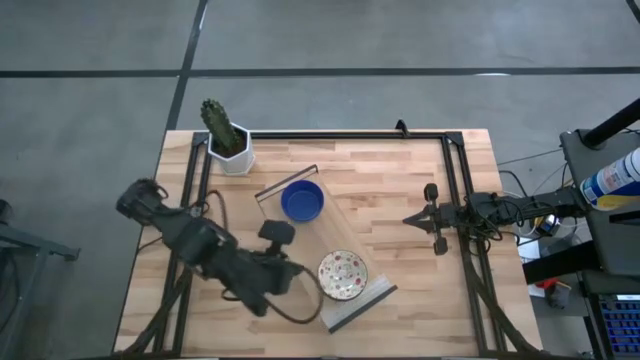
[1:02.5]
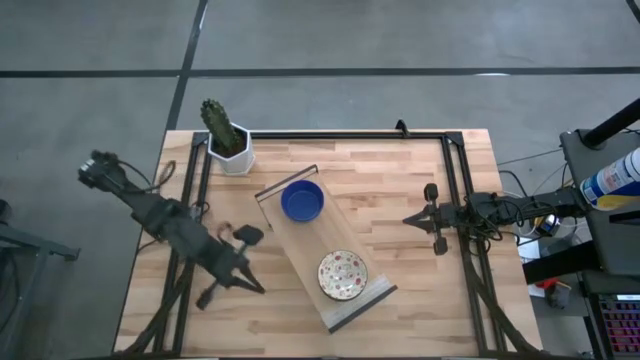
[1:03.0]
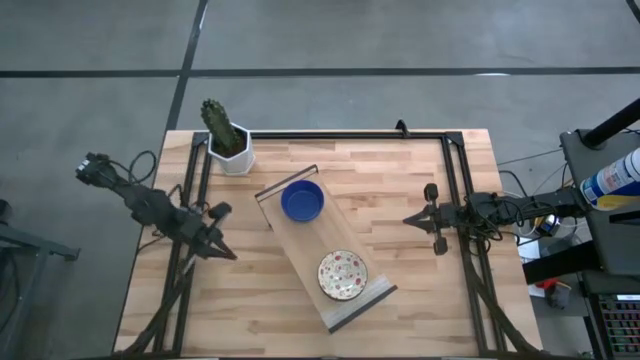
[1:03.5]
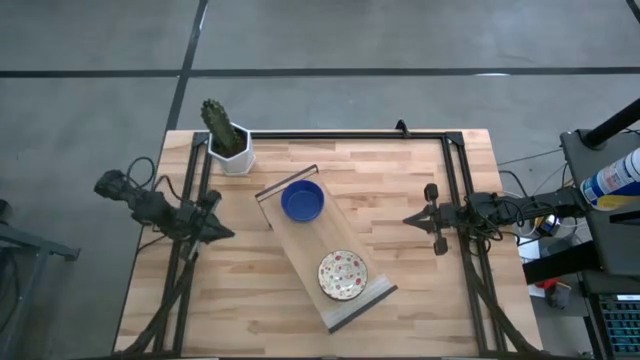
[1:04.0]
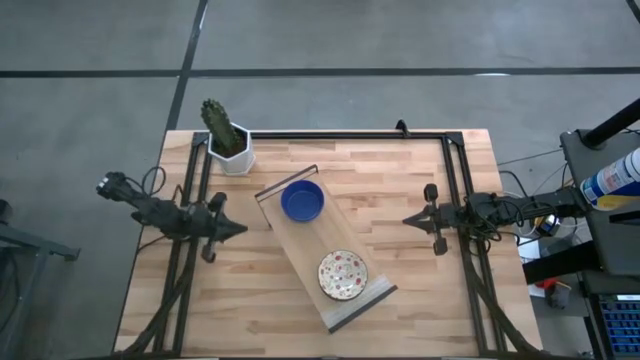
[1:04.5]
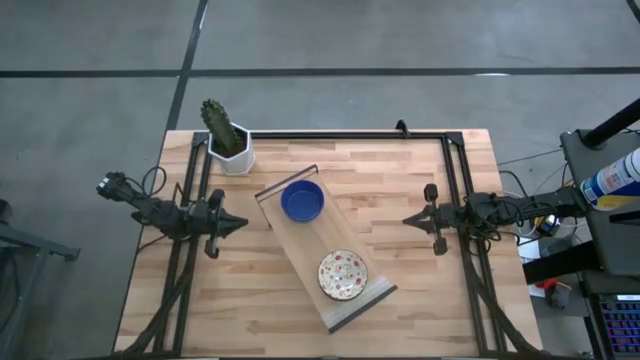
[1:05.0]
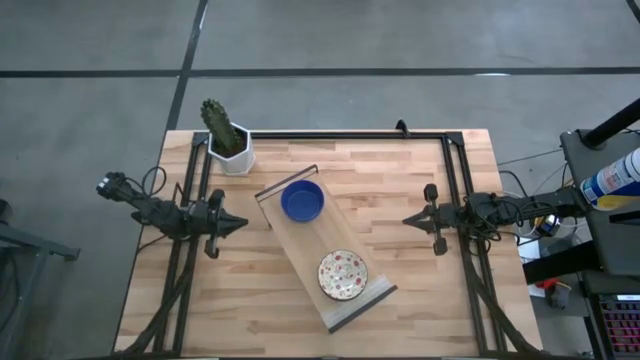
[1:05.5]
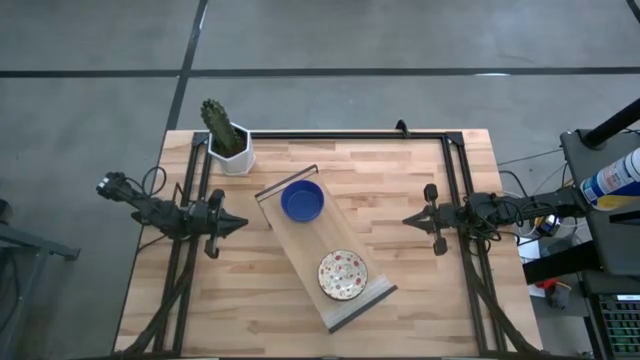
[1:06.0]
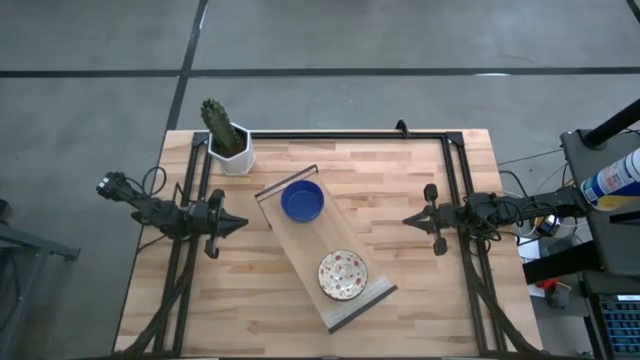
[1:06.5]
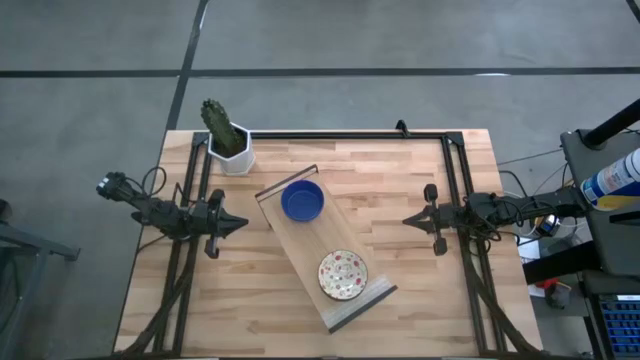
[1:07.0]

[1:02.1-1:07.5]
Task: Pick & Place Mini bowls
Return to Home Position

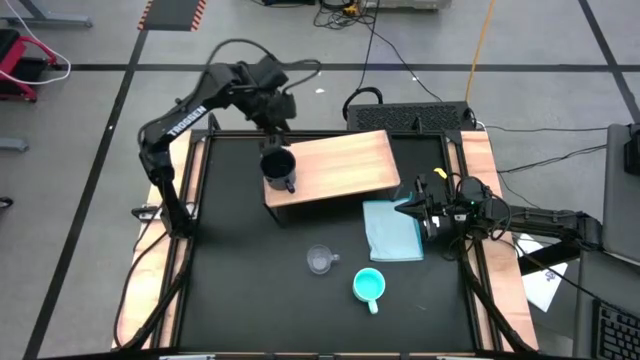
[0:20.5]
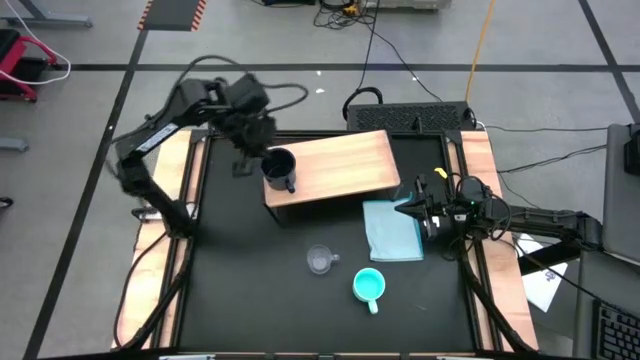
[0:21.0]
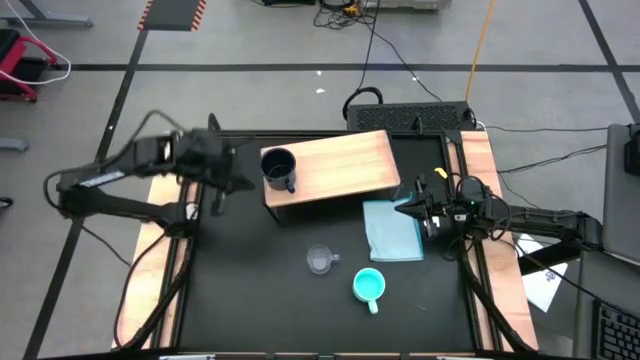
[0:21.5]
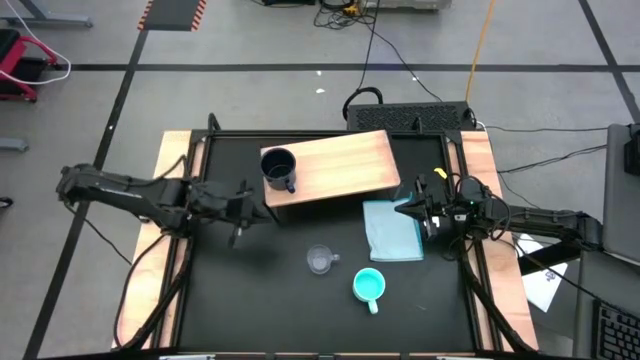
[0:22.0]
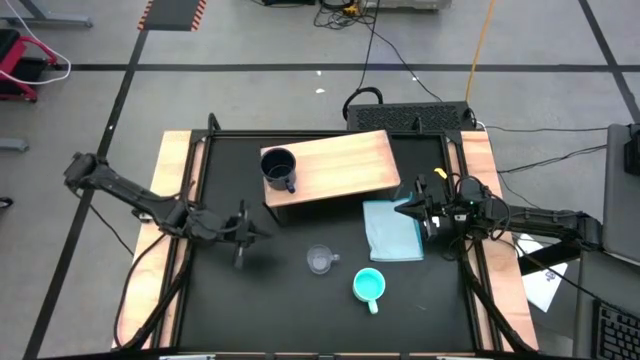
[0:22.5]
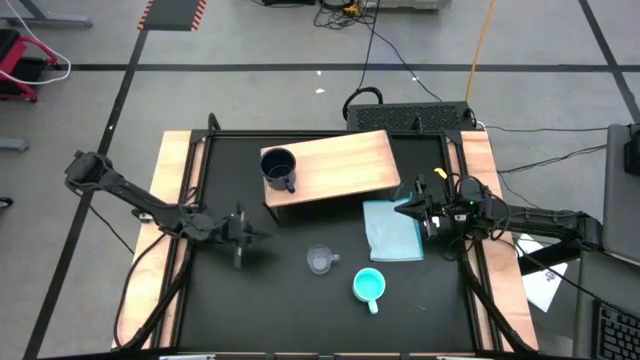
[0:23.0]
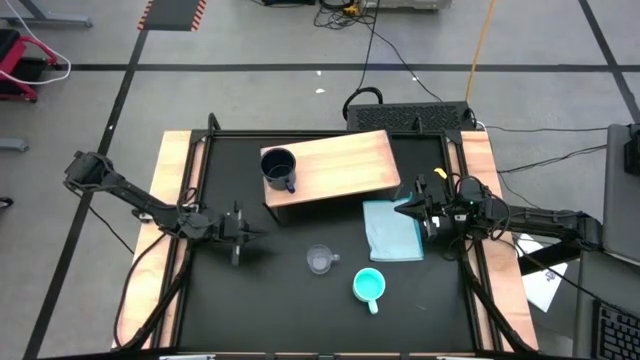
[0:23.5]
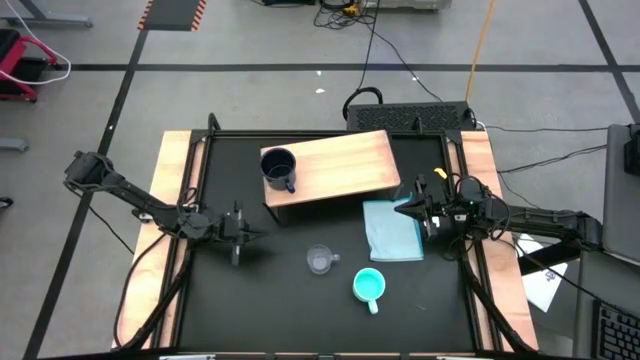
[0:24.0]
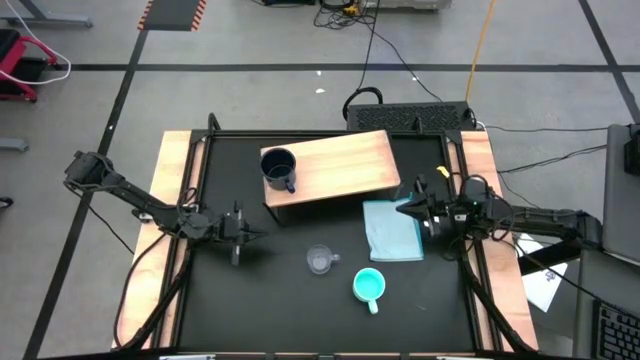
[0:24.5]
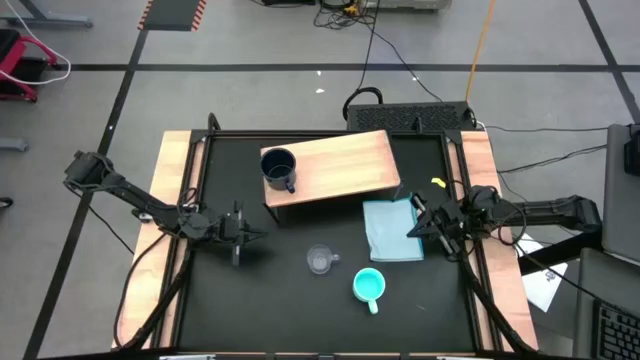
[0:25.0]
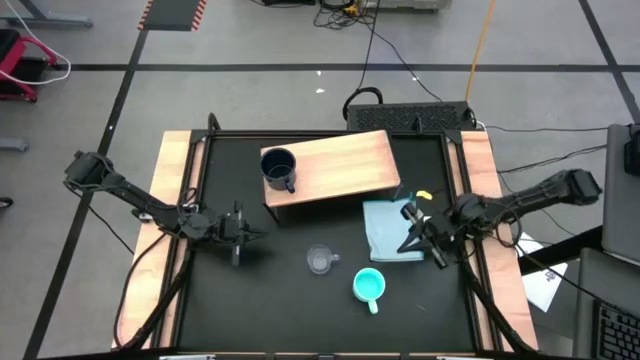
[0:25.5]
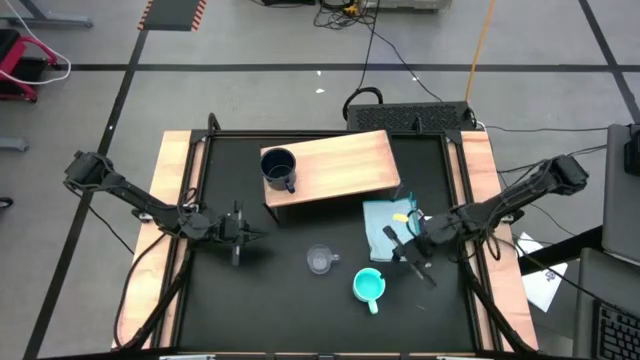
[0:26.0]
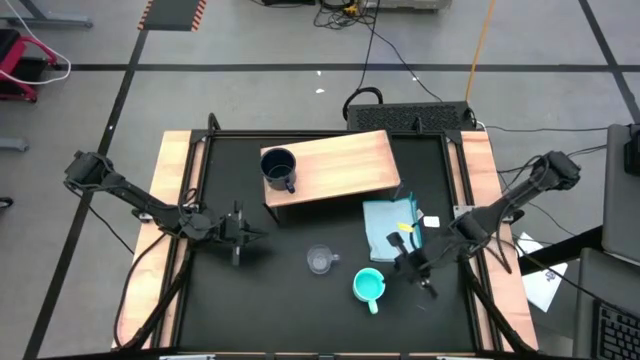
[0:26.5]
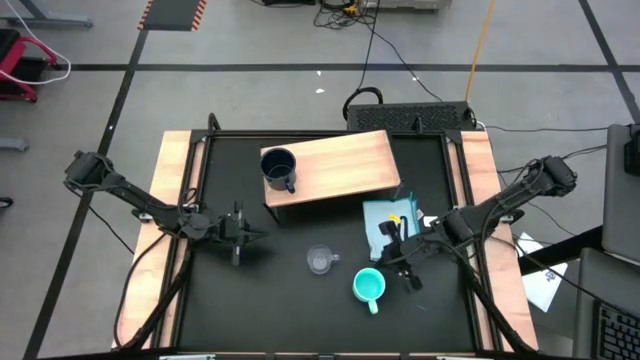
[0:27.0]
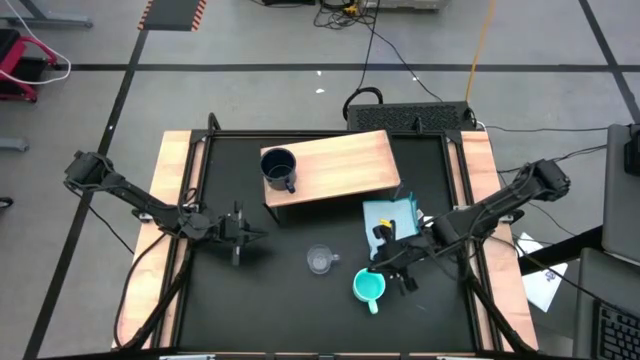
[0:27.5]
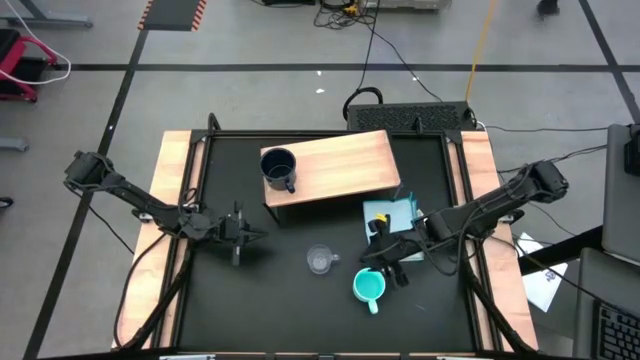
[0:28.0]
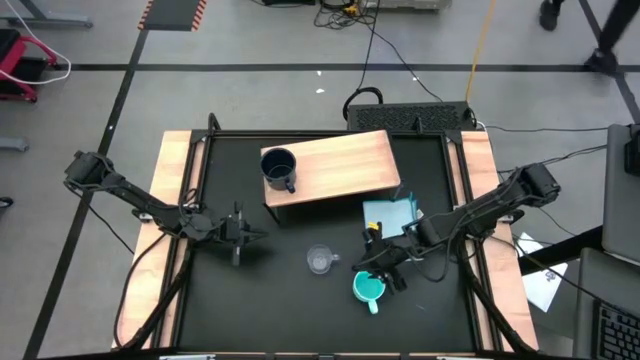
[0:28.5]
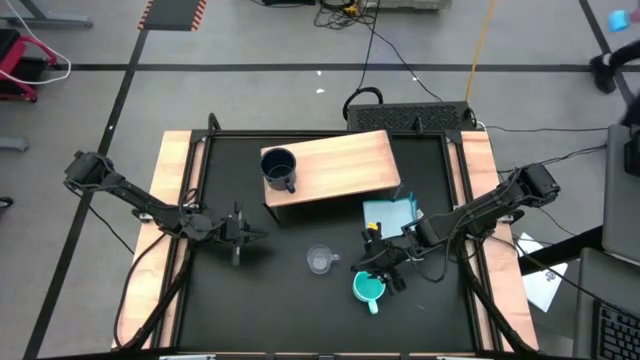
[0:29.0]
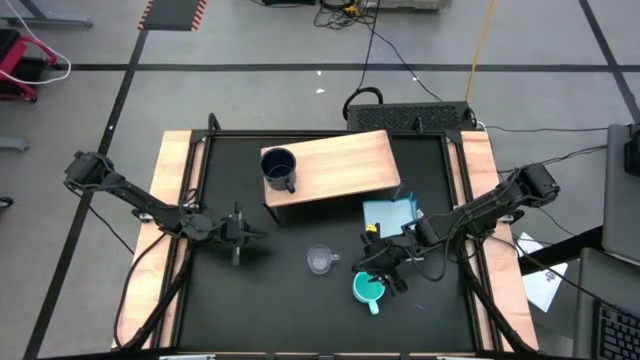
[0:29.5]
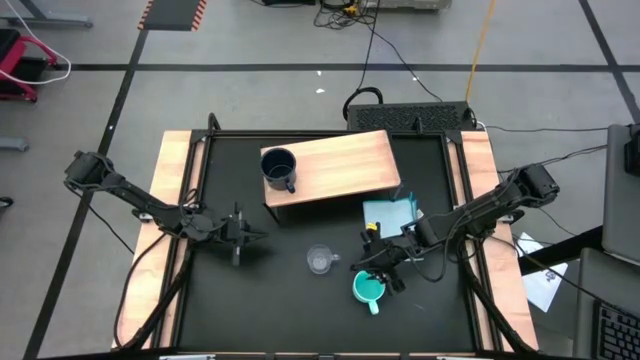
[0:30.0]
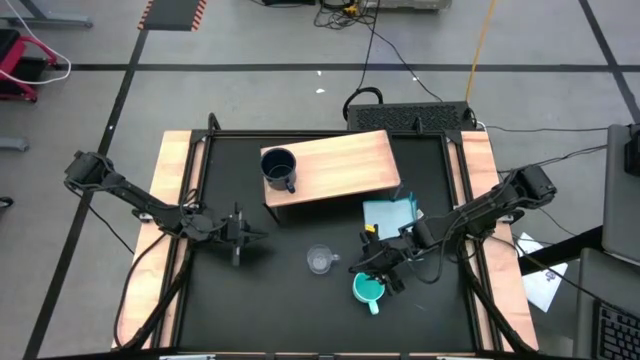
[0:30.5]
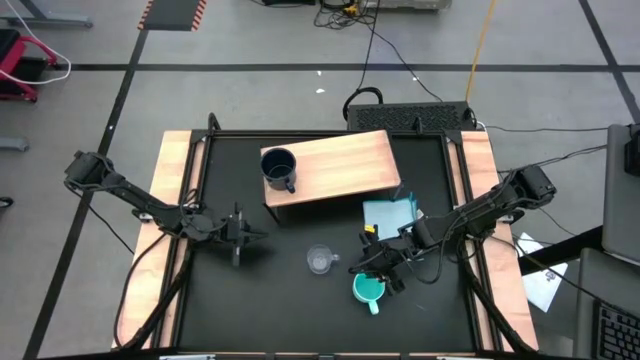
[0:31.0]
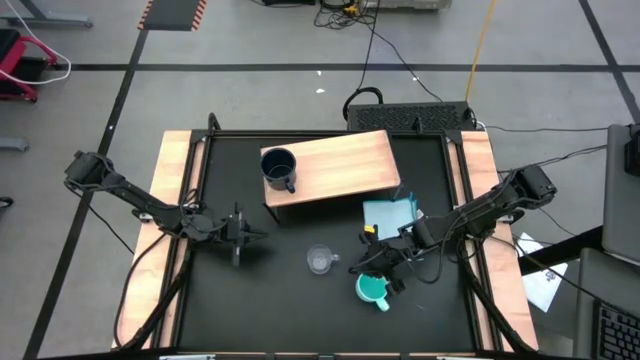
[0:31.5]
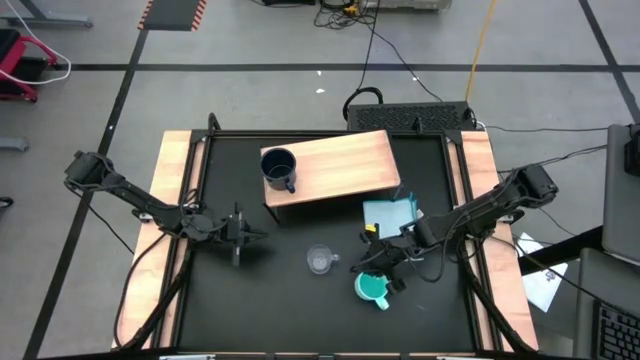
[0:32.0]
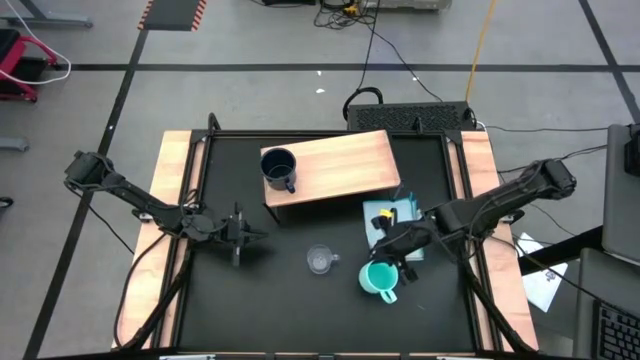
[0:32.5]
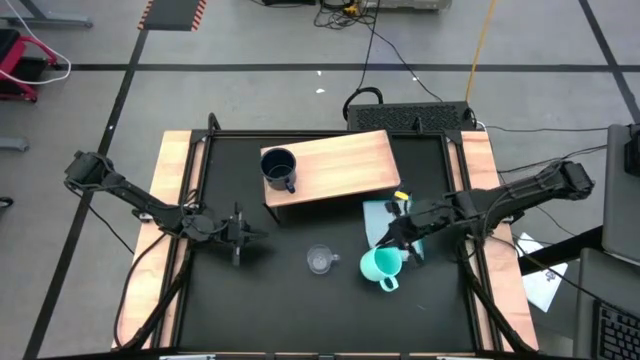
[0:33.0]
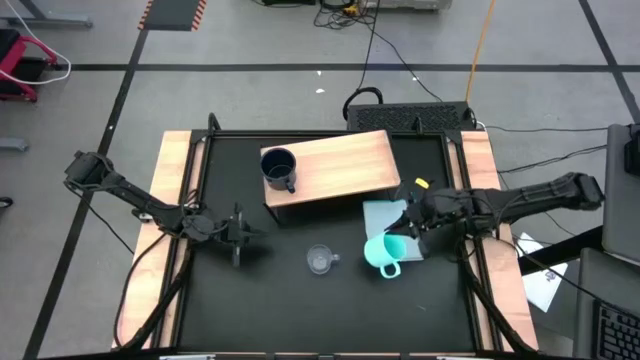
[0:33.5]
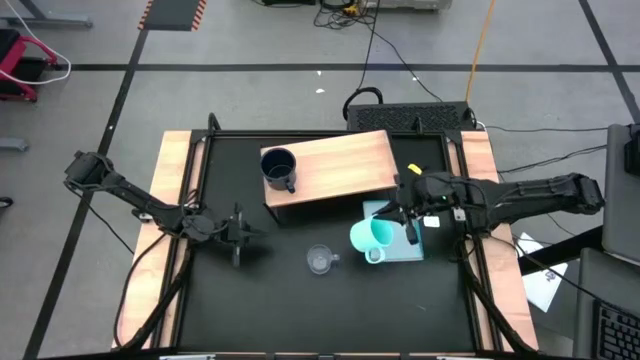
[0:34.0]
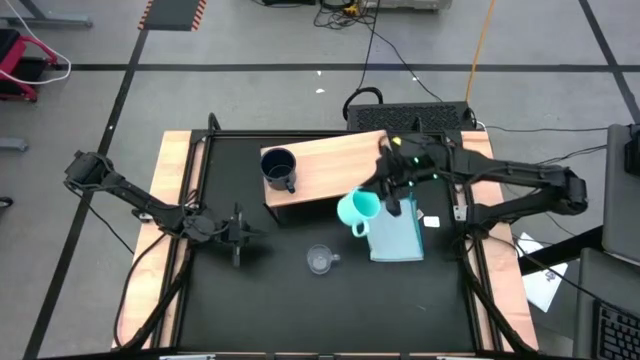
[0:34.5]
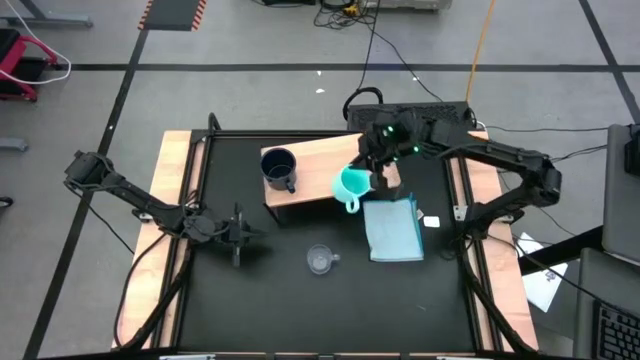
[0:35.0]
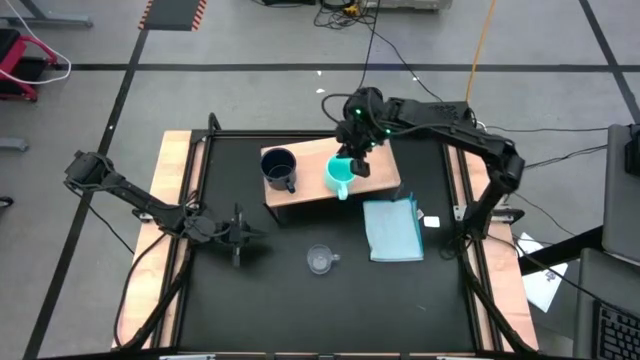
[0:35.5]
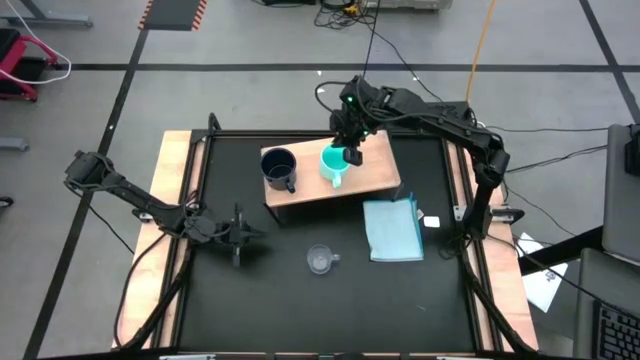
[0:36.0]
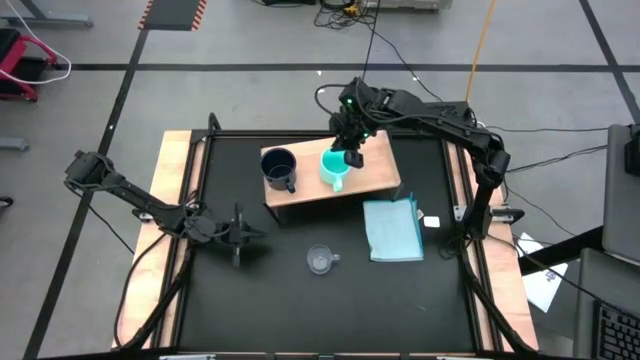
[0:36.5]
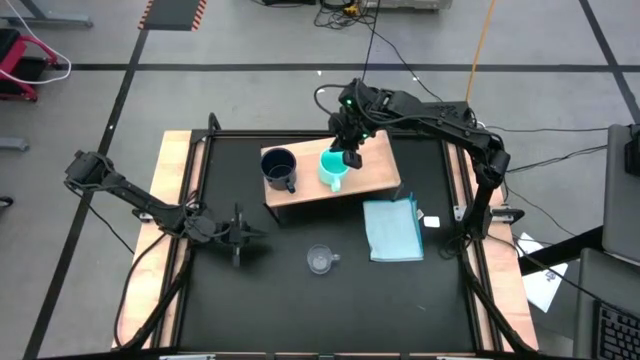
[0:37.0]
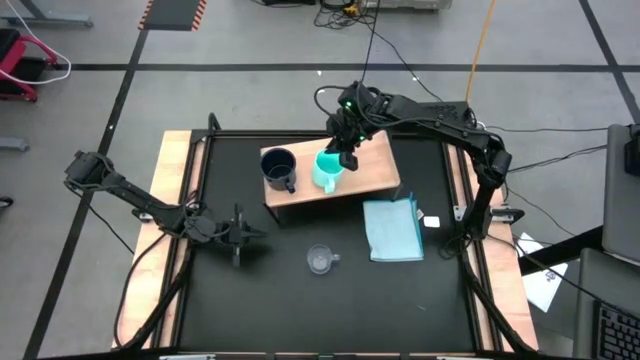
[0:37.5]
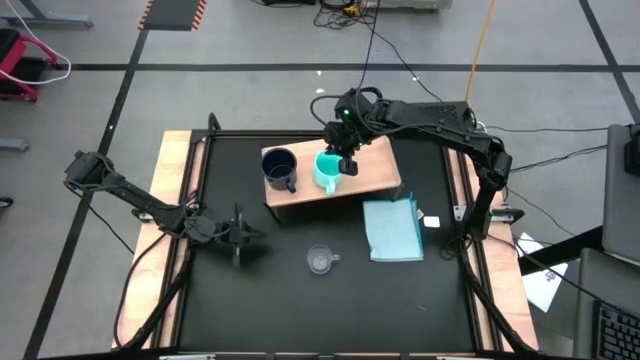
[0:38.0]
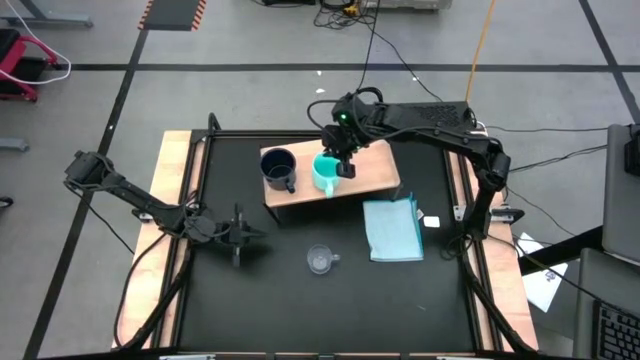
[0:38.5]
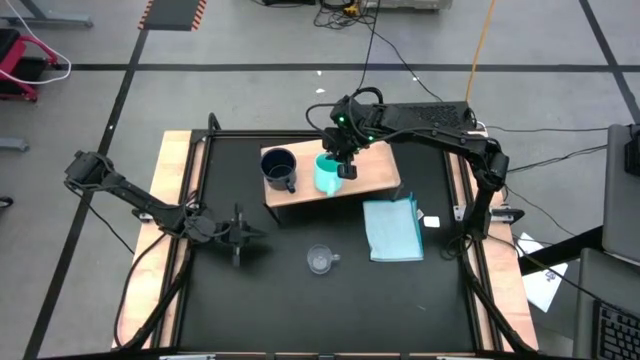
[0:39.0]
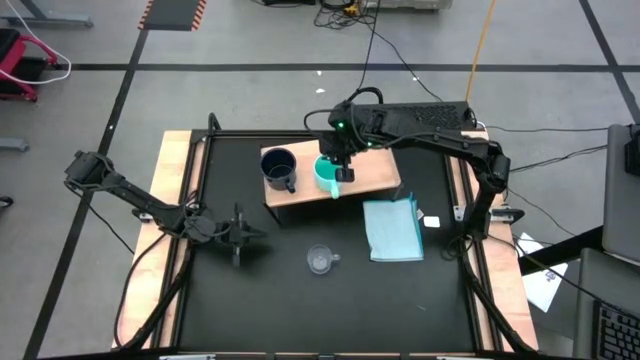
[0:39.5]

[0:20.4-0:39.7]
Task: Stack small to large cups/mugs on shelf
Put the light blue mug on the shelf
